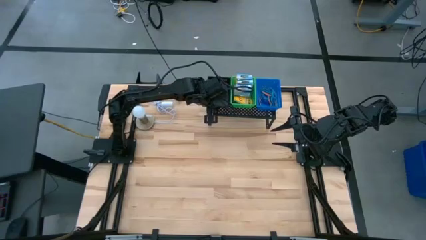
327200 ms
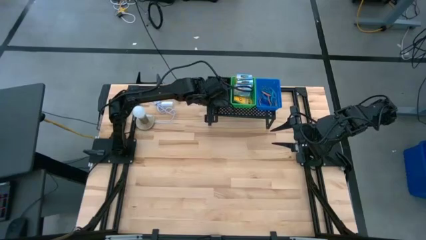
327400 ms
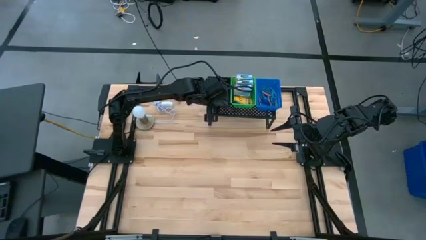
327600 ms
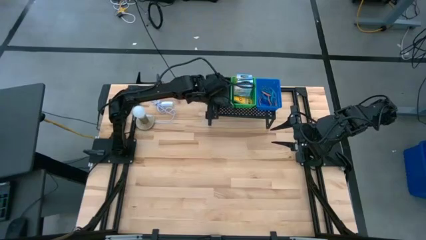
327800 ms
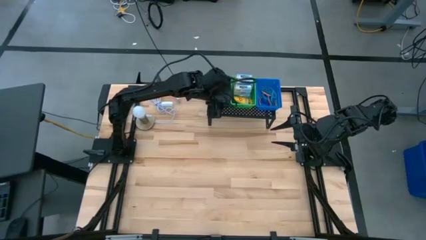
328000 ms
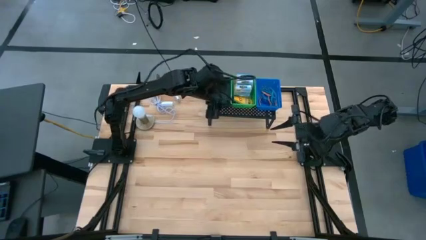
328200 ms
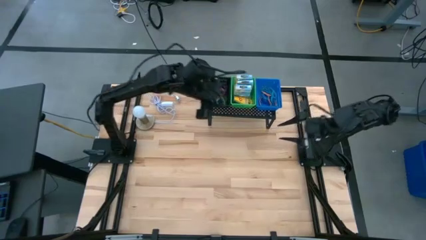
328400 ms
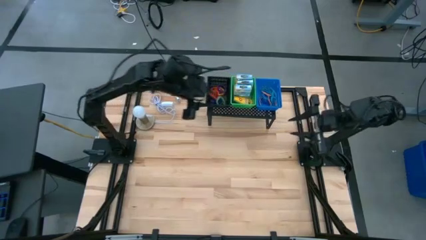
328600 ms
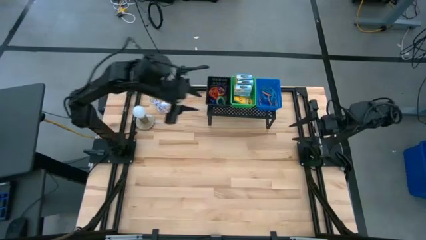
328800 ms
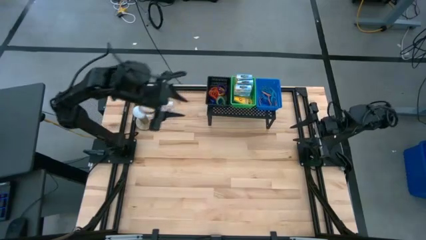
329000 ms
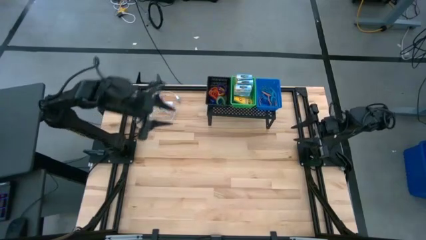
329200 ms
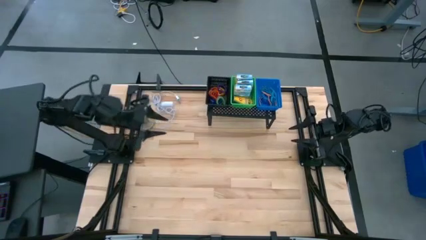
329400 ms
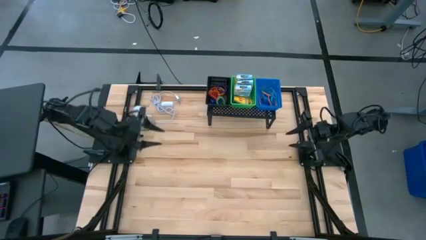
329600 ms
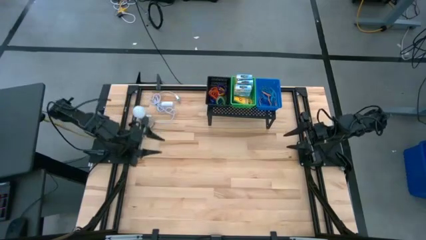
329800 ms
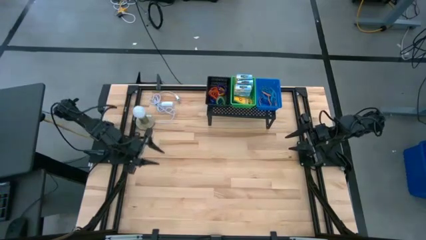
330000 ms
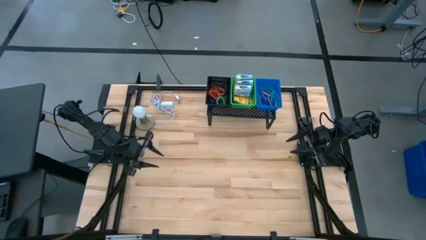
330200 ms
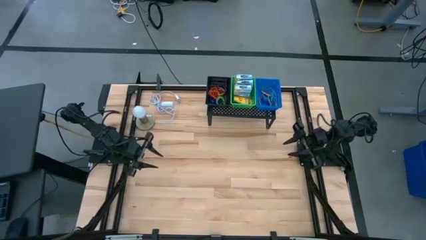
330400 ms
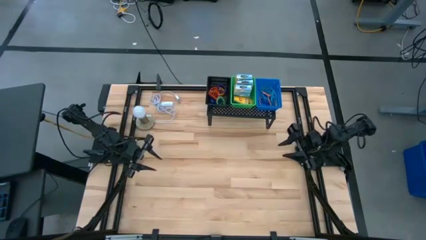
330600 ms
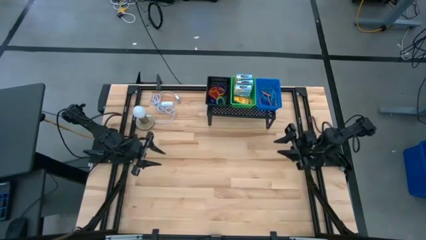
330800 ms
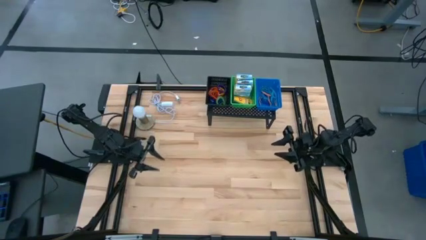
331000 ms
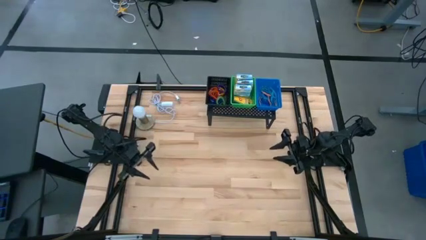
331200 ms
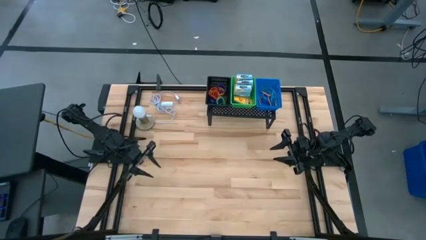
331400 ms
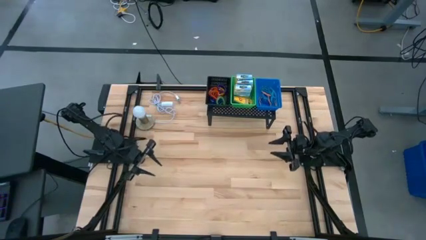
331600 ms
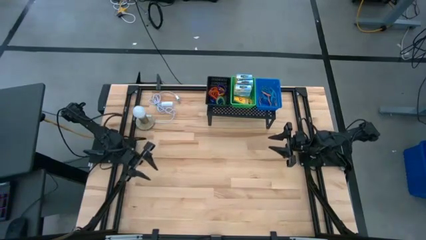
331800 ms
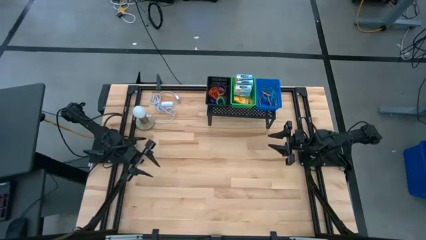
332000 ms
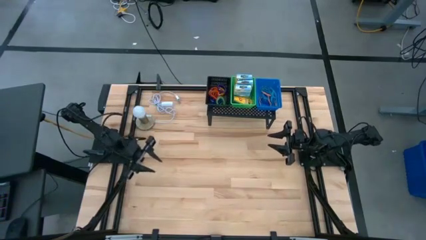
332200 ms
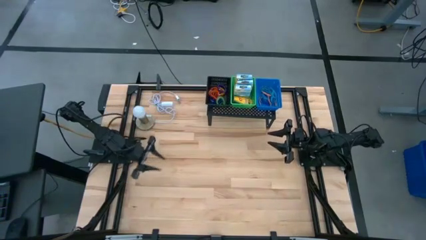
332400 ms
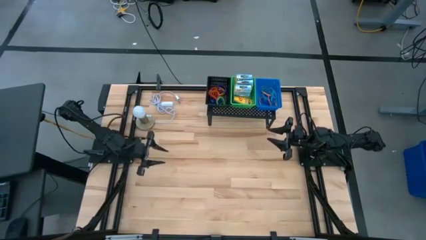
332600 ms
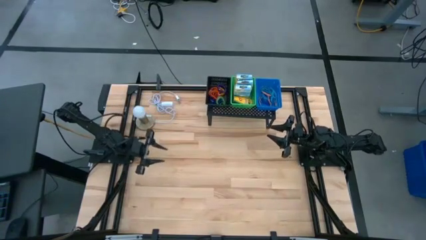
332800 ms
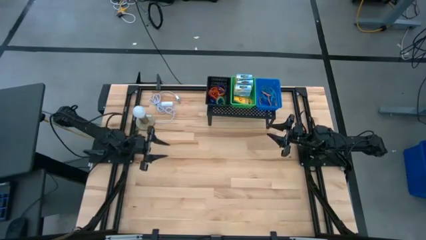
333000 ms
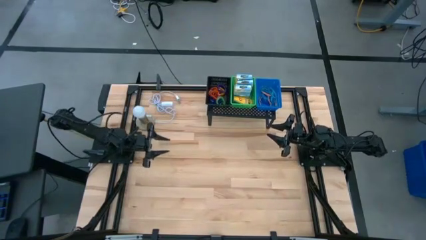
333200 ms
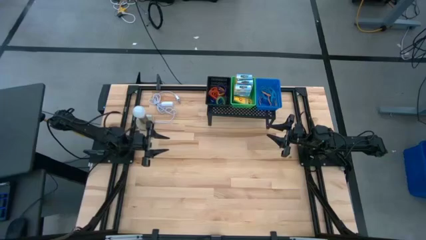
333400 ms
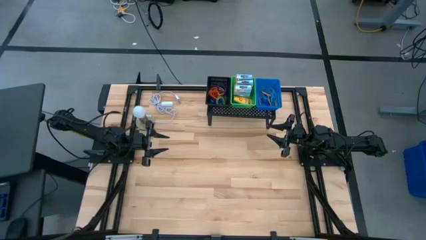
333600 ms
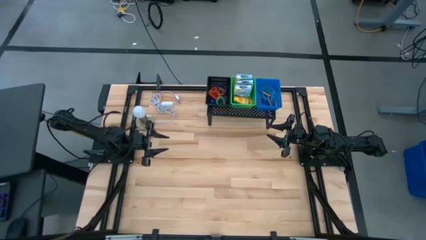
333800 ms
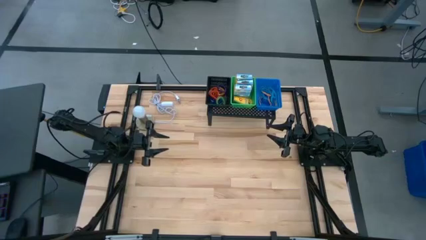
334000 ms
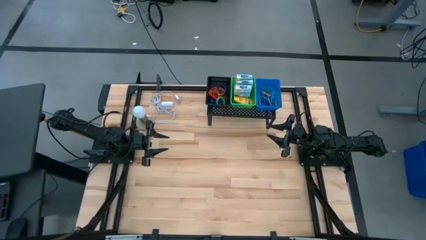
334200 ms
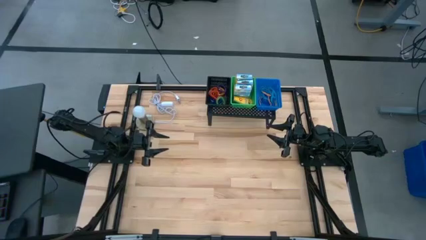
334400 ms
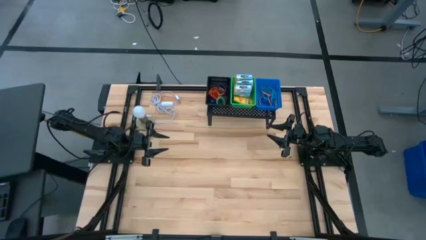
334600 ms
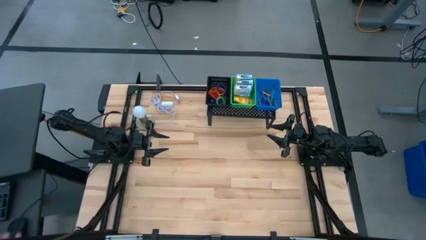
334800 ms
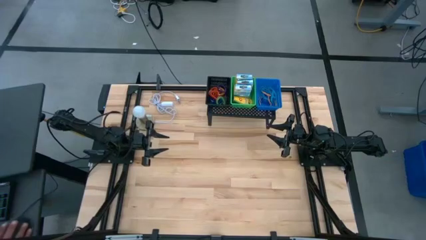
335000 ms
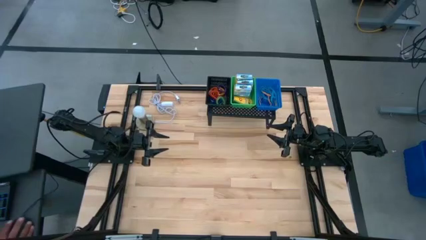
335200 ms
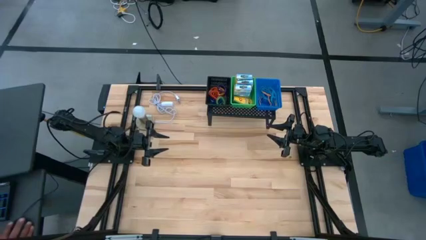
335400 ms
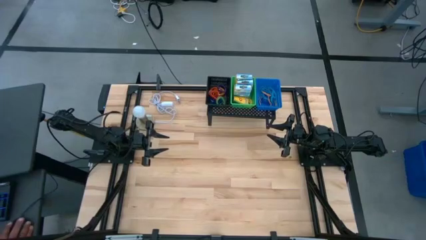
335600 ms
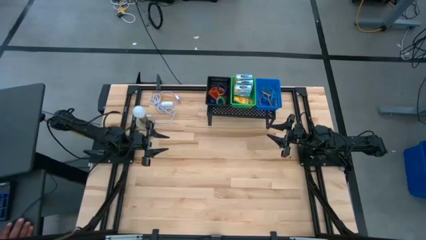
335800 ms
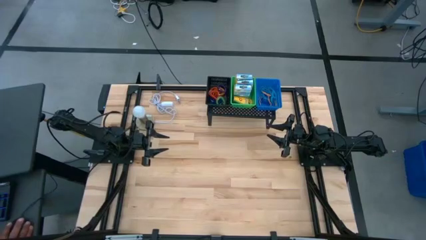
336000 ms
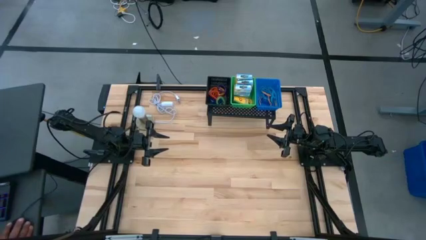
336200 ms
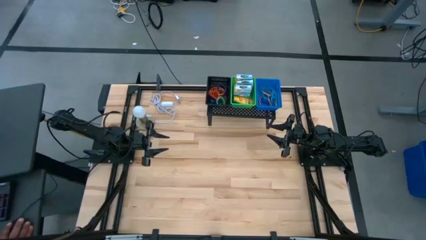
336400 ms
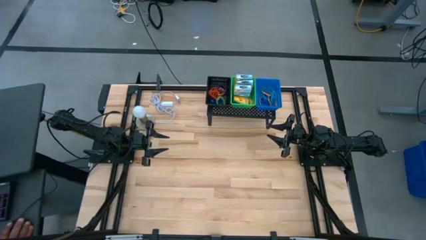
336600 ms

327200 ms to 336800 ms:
Task: Pick & Place Office Desk Supplies
Return to Home Position
